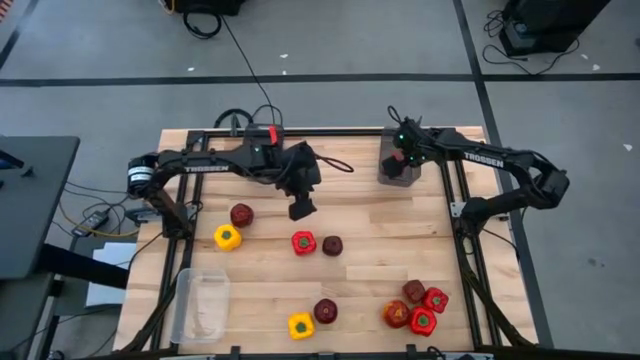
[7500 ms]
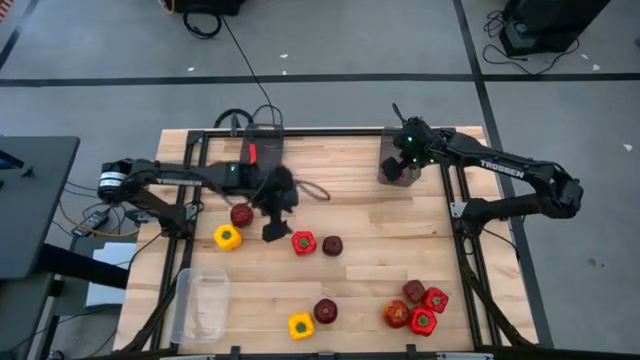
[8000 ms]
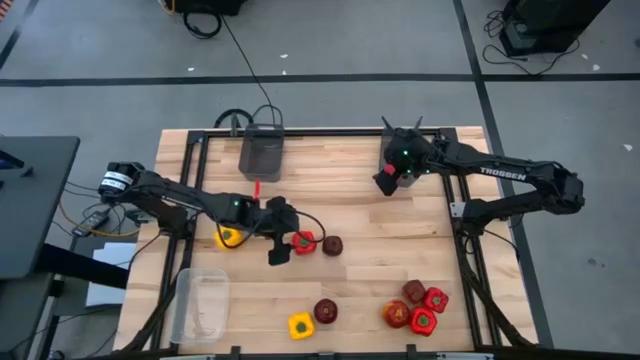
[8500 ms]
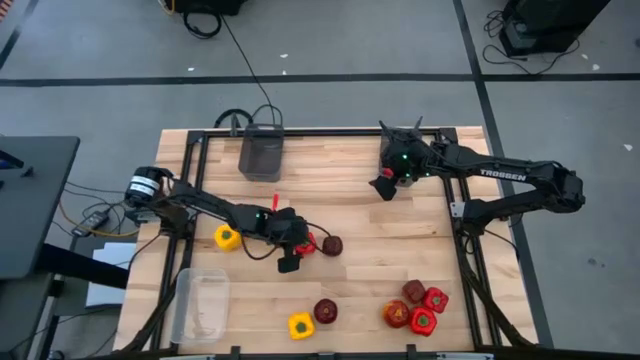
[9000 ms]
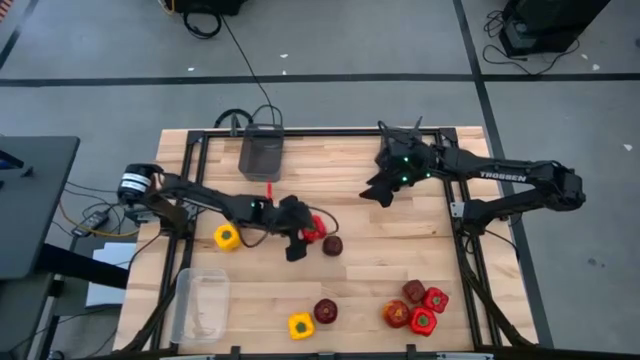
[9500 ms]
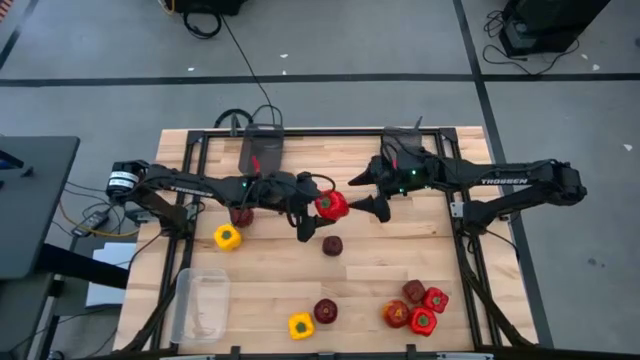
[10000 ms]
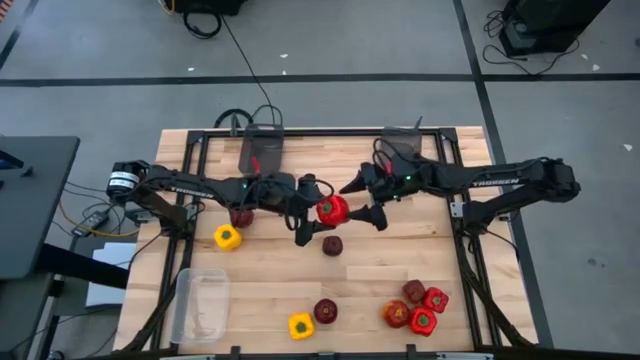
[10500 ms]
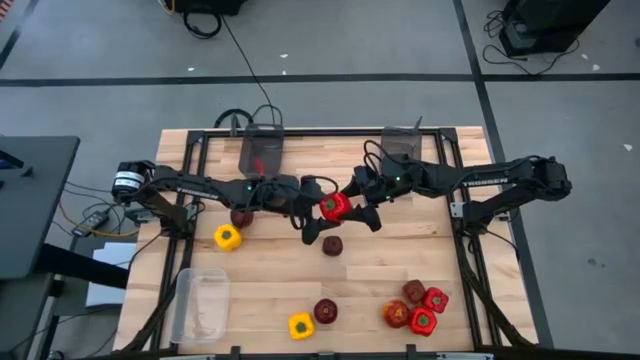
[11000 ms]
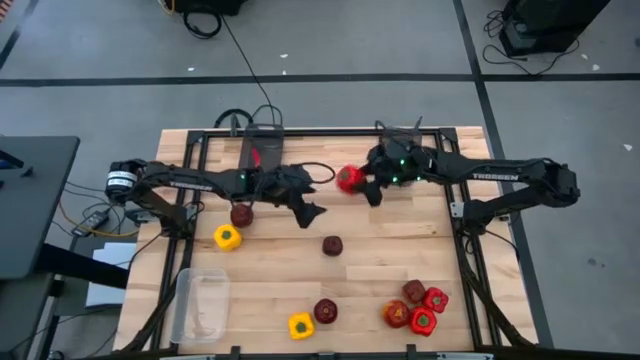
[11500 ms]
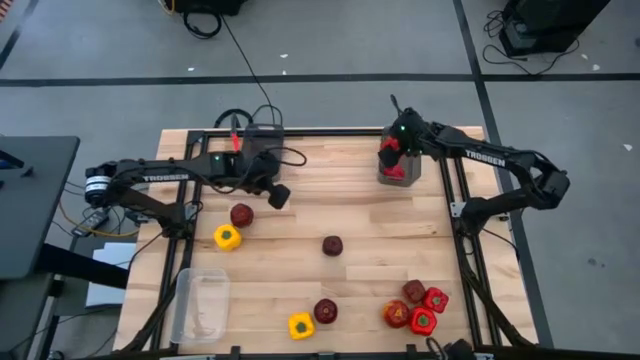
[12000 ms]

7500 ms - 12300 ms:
Task: Sort produce into baskets
Put the left red bell pepper into the top right black transparent bin

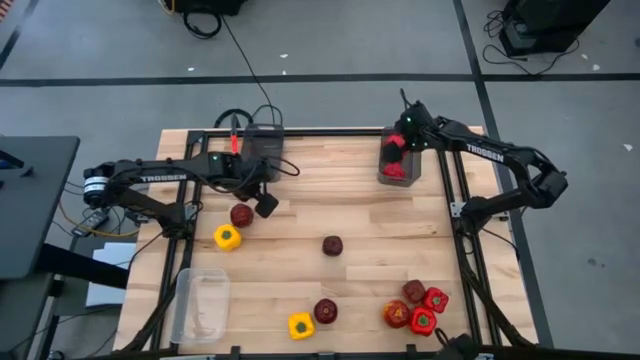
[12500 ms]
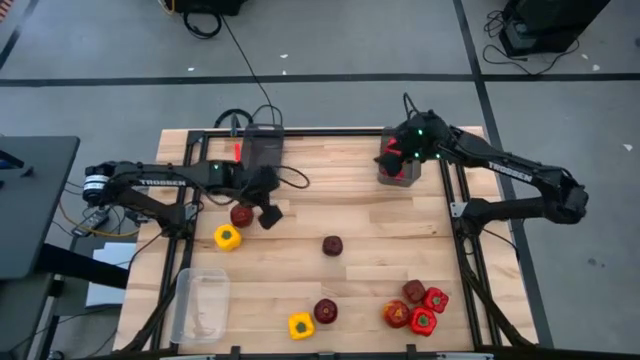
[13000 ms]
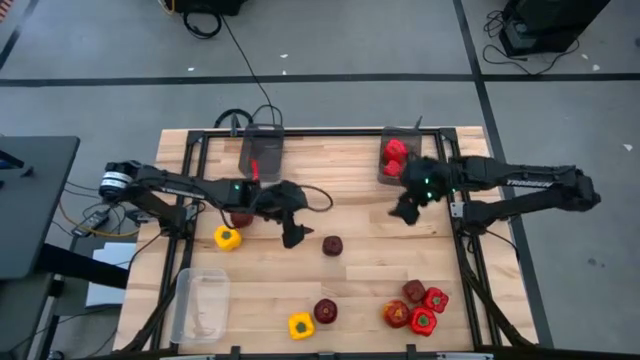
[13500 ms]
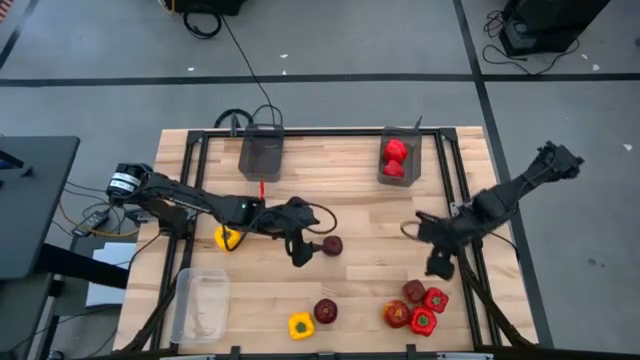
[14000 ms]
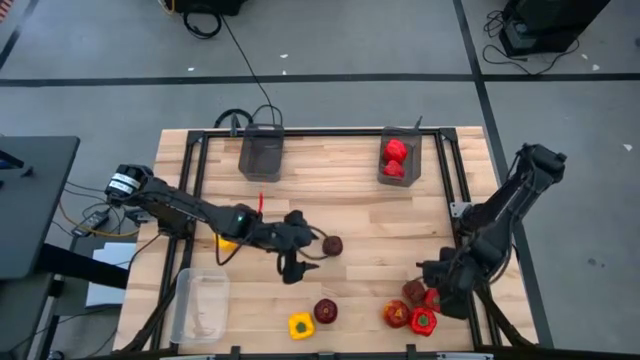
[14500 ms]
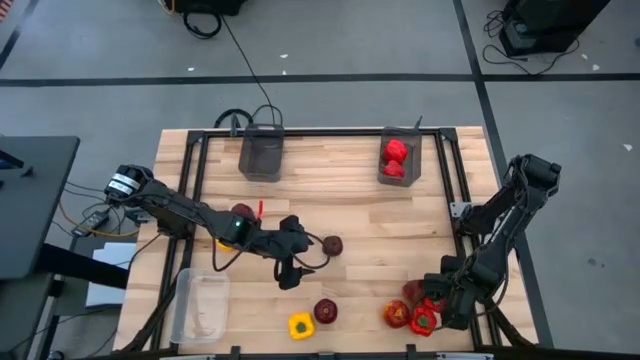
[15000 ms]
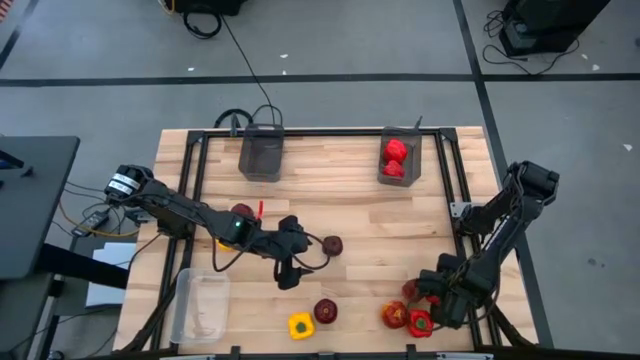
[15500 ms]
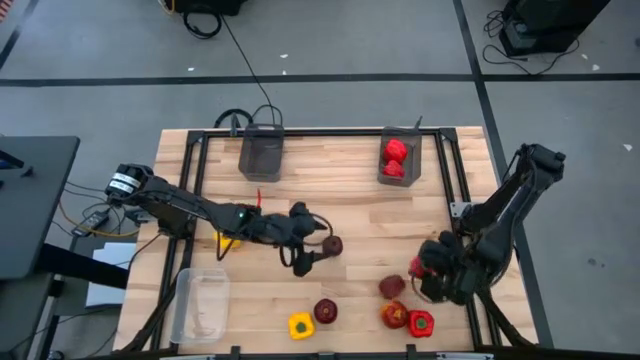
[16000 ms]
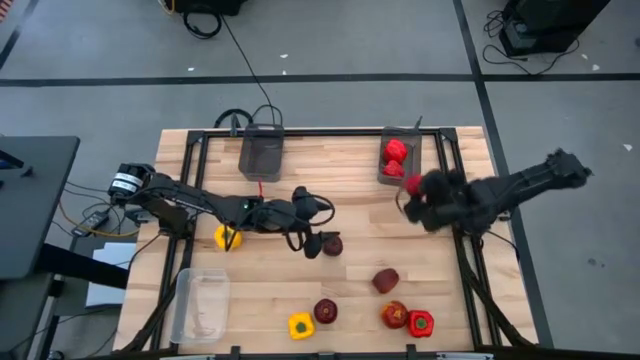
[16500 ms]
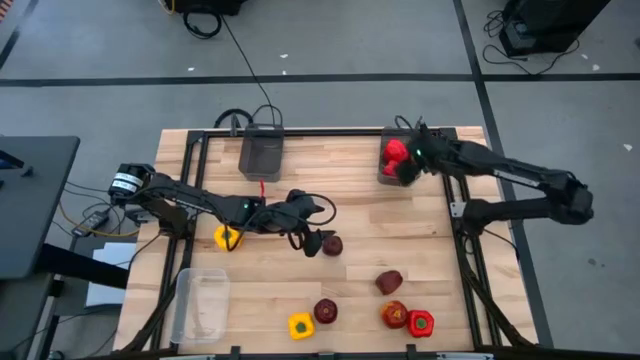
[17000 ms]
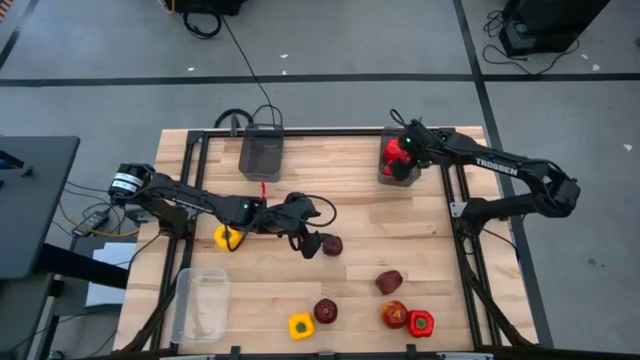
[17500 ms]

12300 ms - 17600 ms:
Put the right red bell pepper into the top right black transparent bin

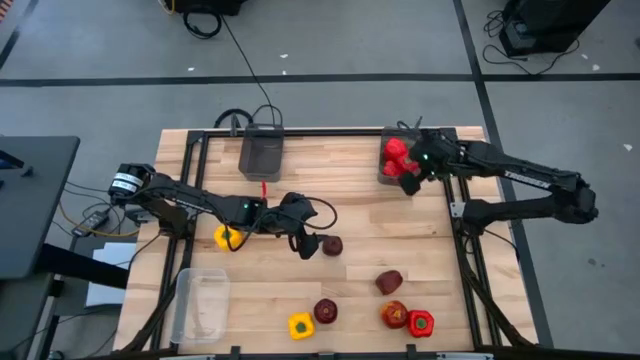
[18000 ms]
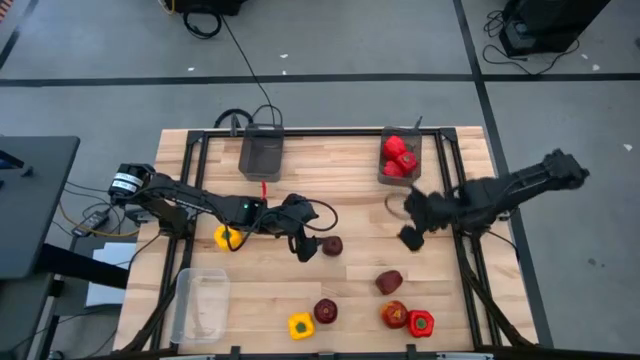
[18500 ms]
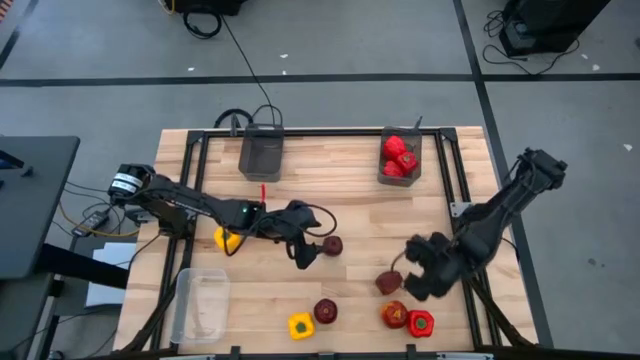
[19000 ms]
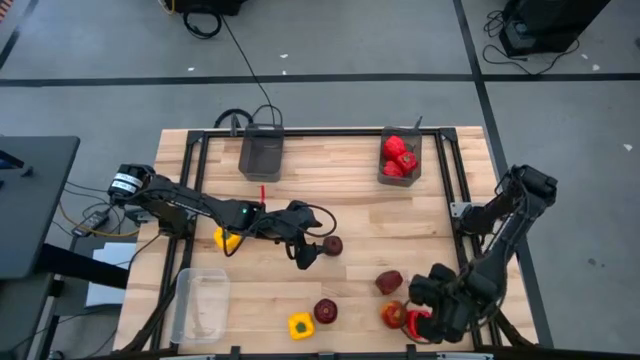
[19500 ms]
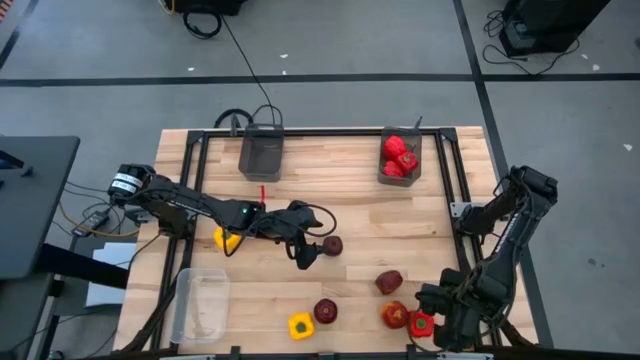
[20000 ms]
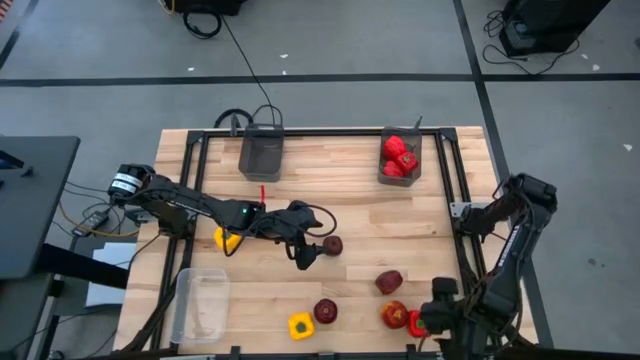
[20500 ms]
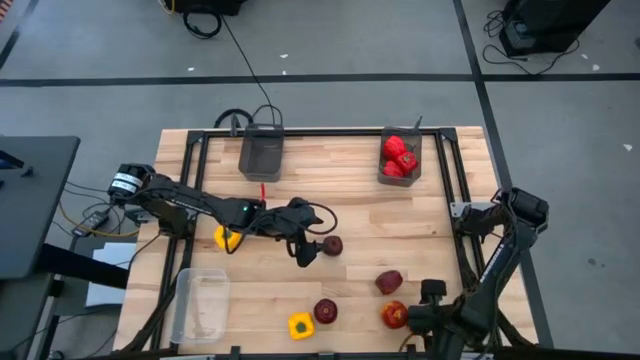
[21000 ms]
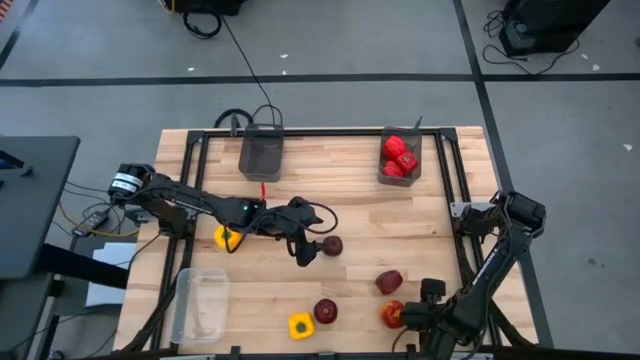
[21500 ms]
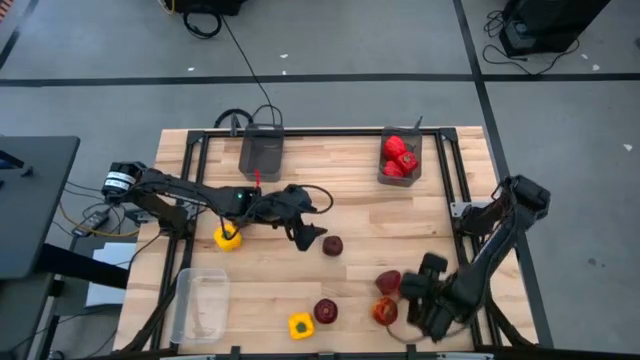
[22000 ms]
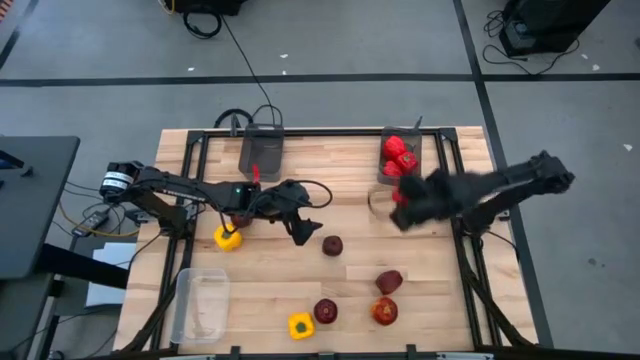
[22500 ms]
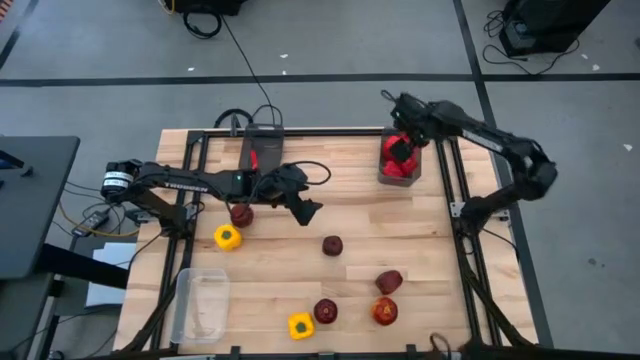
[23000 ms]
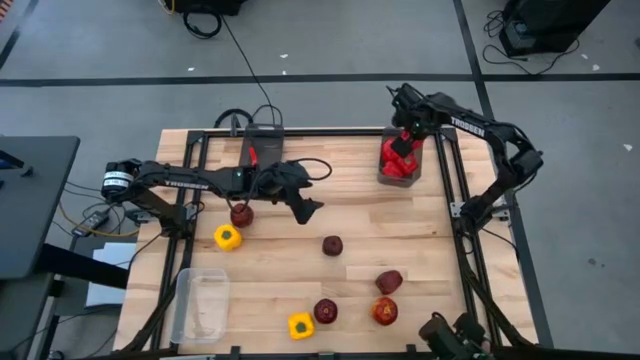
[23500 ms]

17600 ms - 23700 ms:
Put the red bell pepper into the top right black transparent bin

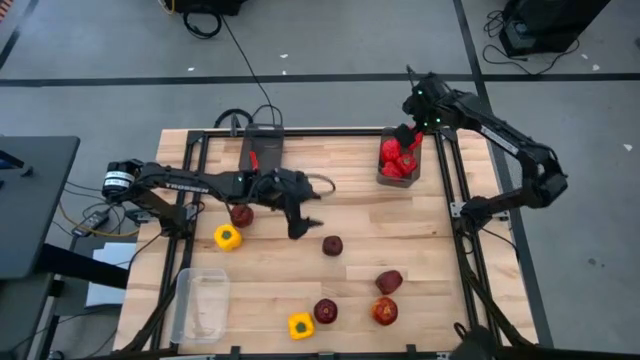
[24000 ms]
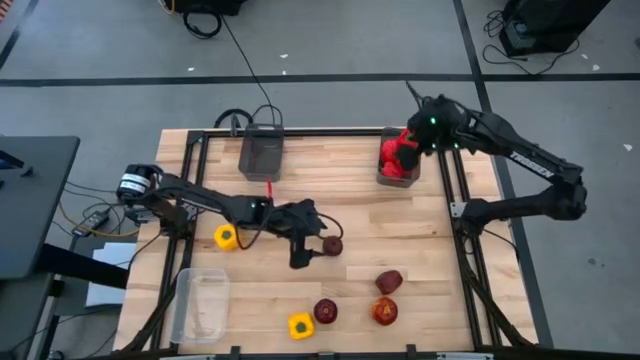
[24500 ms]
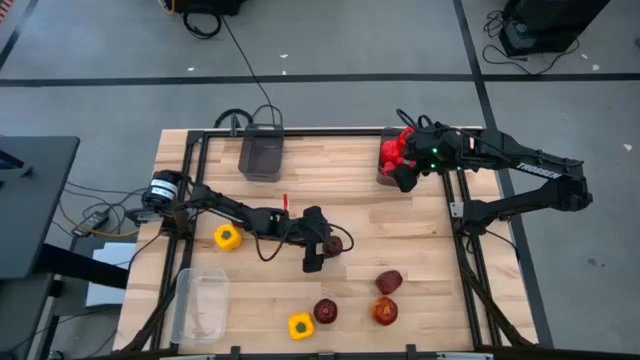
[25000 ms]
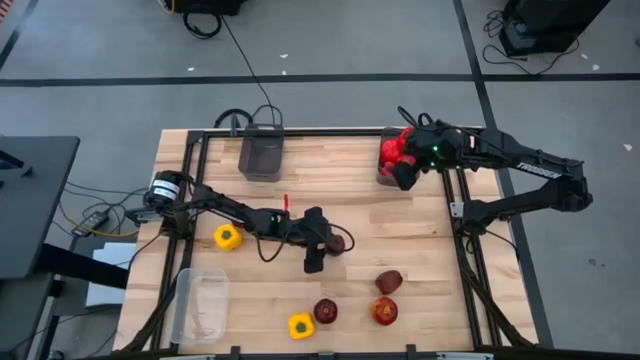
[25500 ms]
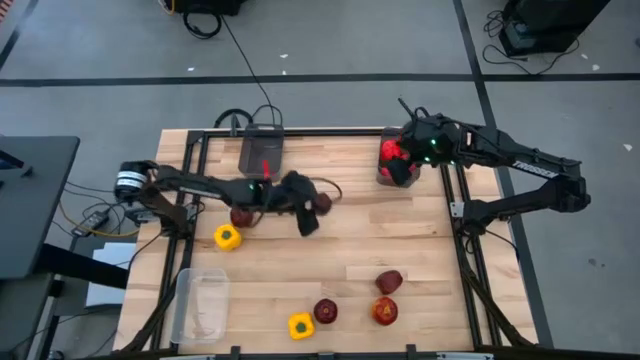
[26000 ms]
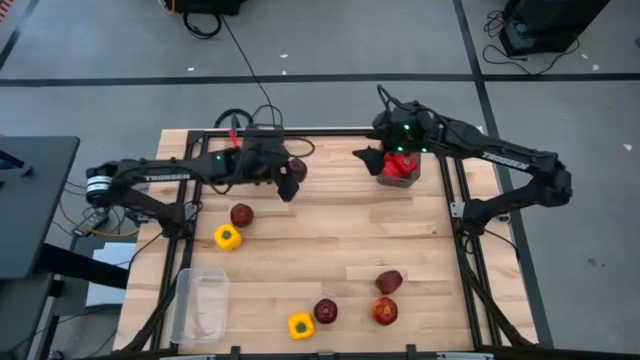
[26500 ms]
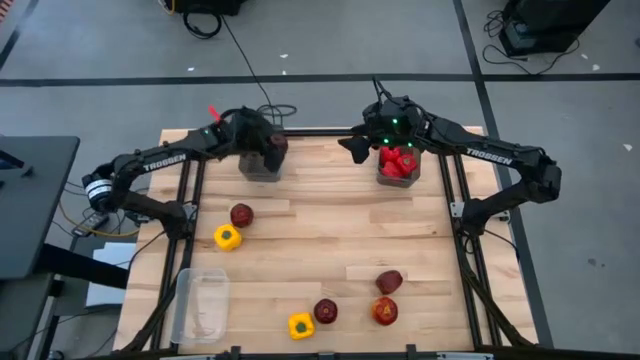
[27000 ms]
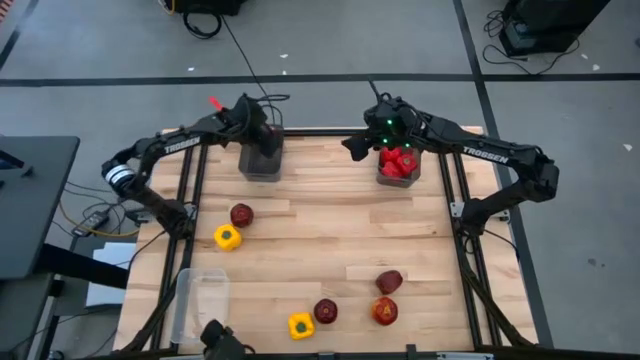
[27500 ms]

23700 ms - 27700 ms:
Put the red apple into the top left black transparent bin

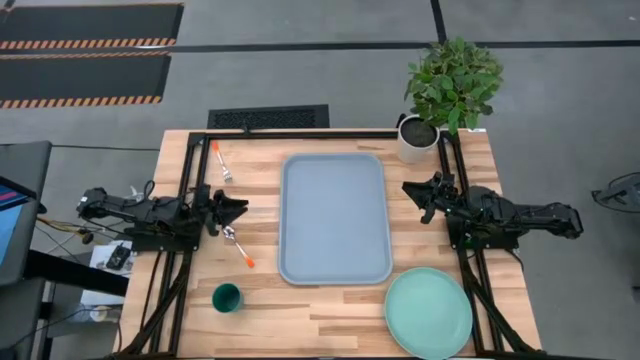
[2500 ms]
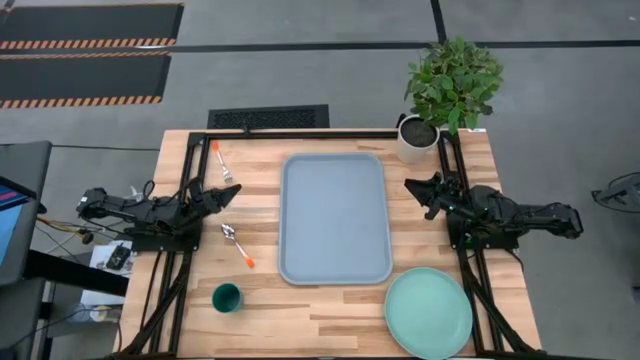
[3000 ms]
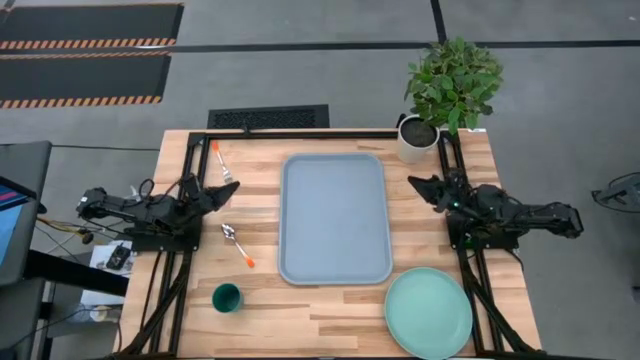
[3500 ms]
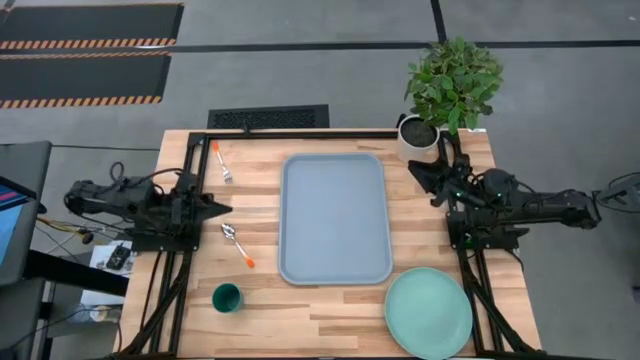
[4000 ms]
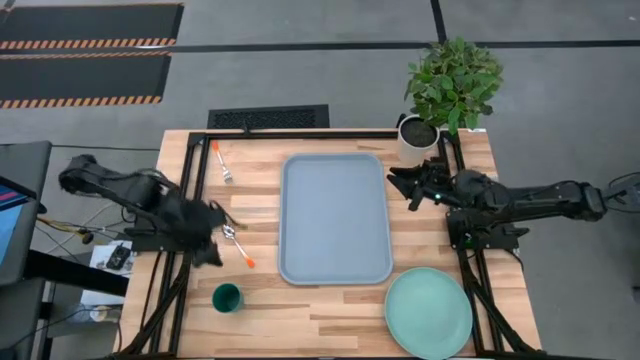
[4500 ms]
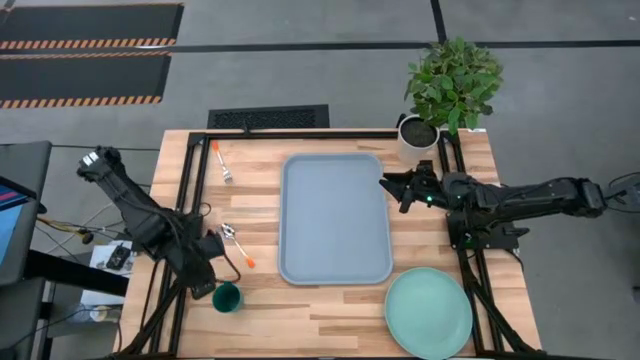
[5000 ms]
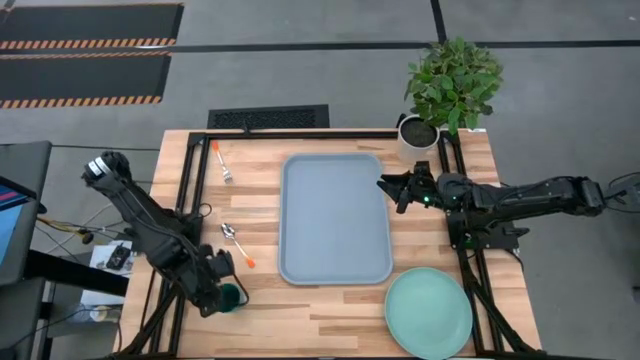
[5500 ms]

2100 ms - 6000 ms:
Task: Pick and place plate/cup/fork/spoon on tray
Put the green cup on the top right of the gray serving tray
